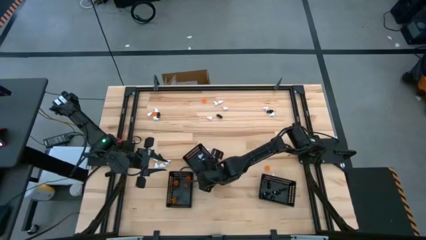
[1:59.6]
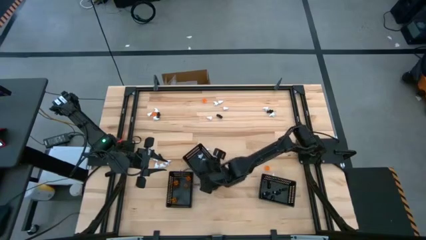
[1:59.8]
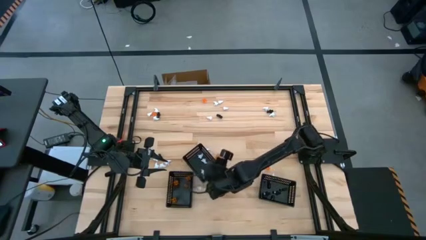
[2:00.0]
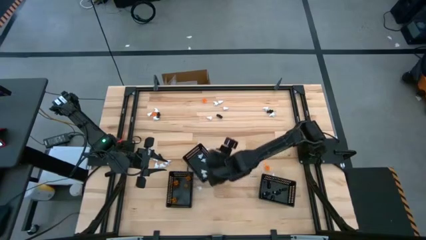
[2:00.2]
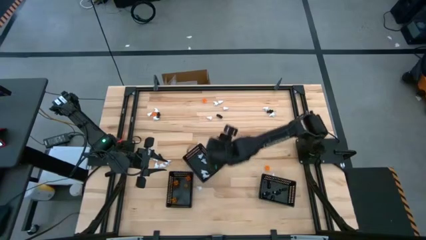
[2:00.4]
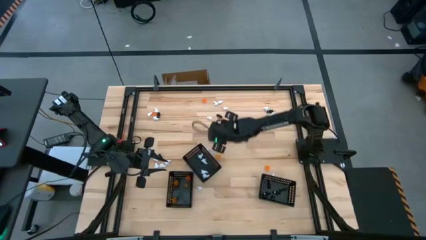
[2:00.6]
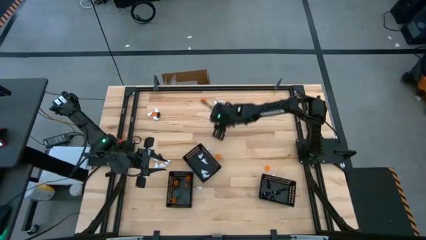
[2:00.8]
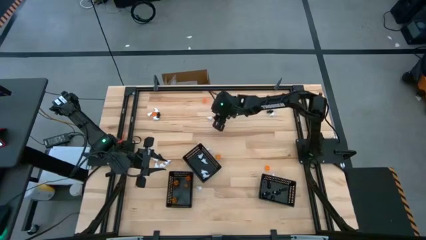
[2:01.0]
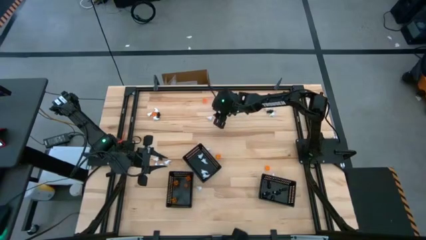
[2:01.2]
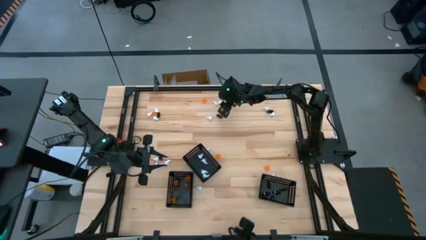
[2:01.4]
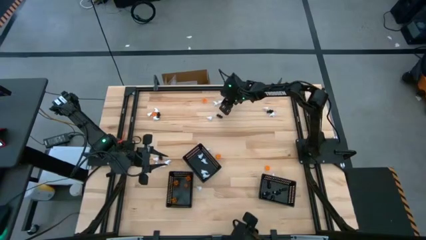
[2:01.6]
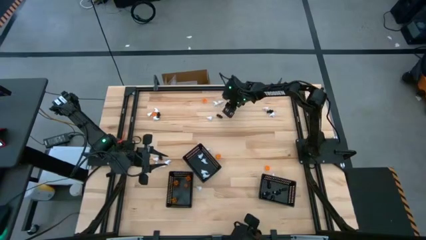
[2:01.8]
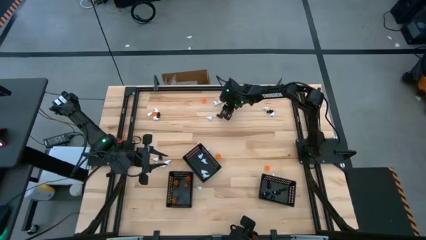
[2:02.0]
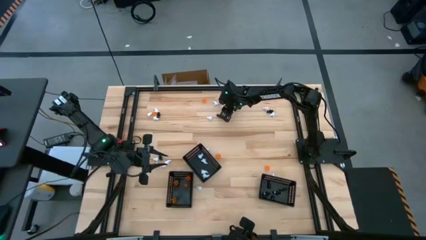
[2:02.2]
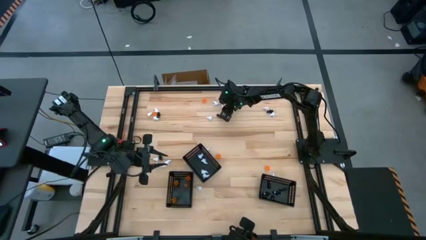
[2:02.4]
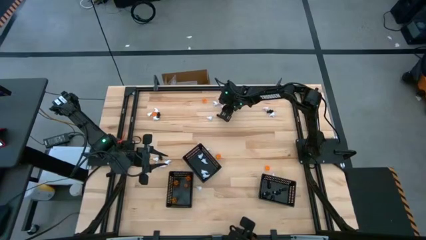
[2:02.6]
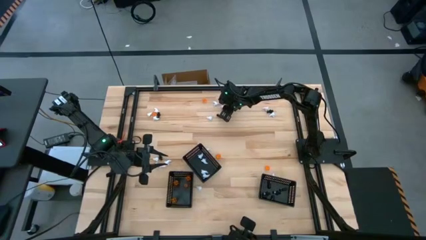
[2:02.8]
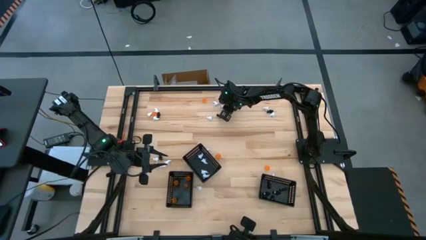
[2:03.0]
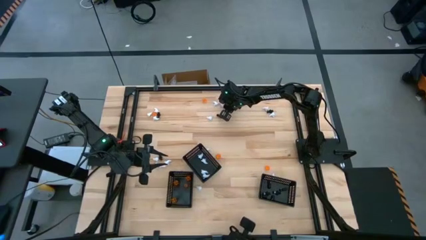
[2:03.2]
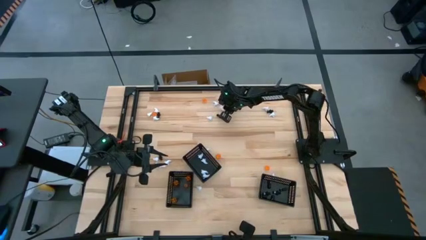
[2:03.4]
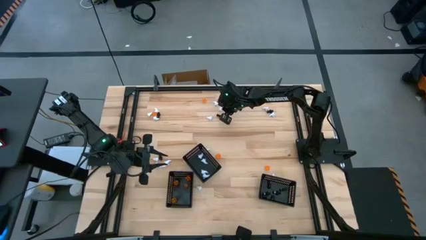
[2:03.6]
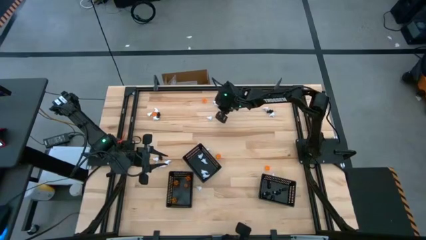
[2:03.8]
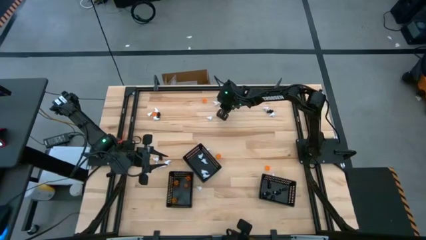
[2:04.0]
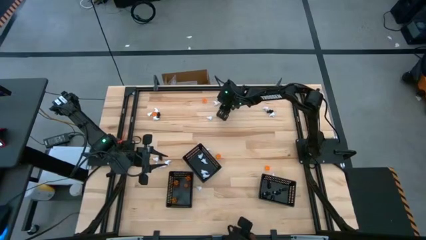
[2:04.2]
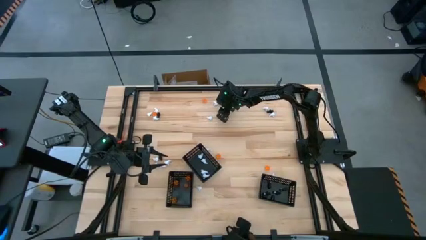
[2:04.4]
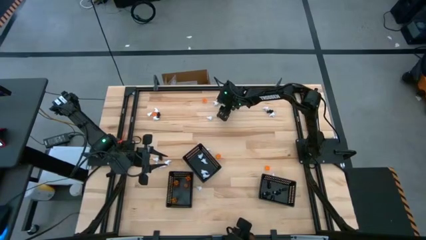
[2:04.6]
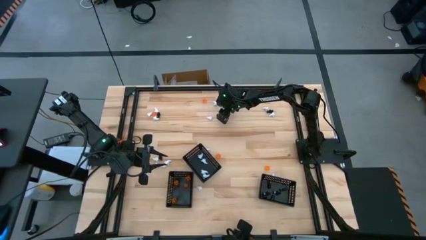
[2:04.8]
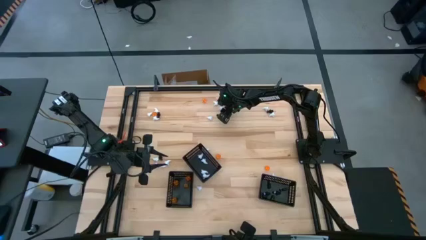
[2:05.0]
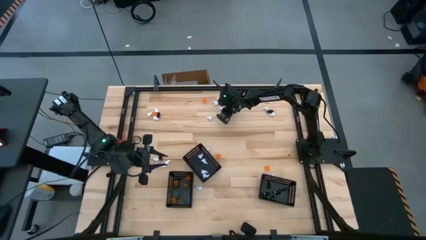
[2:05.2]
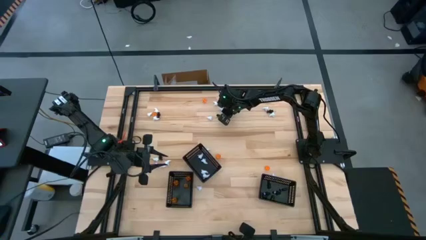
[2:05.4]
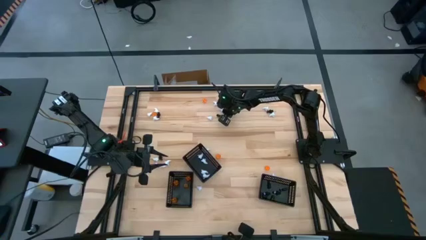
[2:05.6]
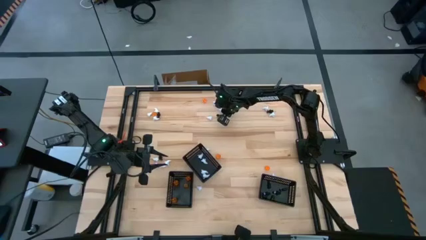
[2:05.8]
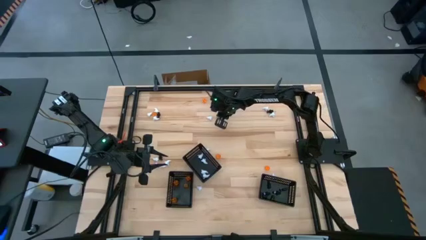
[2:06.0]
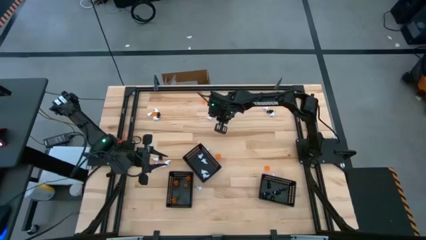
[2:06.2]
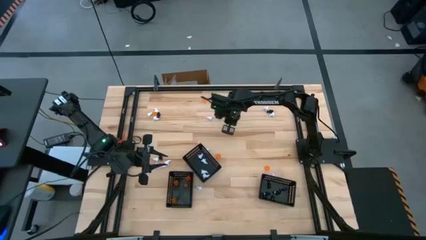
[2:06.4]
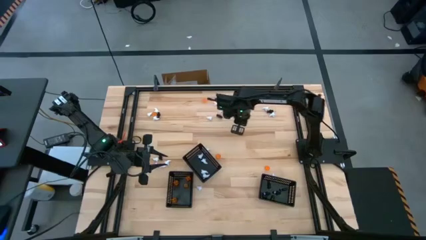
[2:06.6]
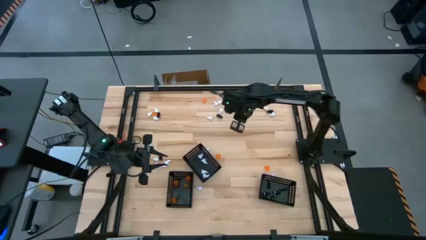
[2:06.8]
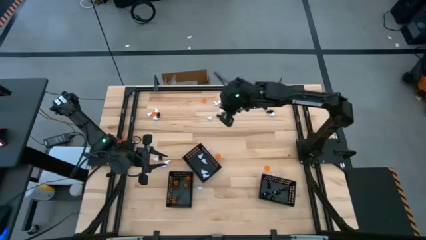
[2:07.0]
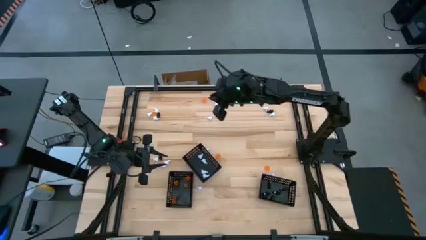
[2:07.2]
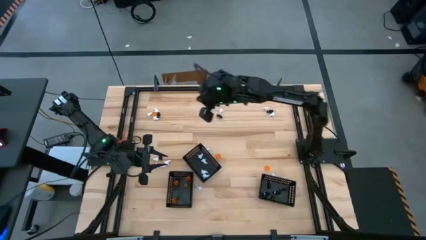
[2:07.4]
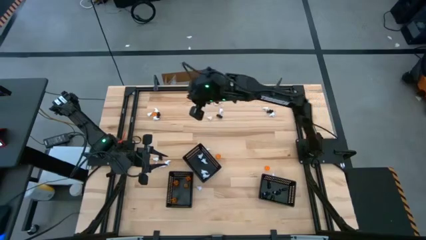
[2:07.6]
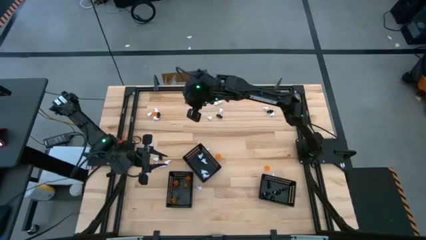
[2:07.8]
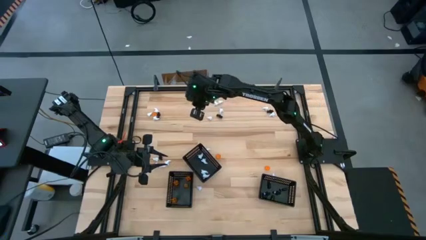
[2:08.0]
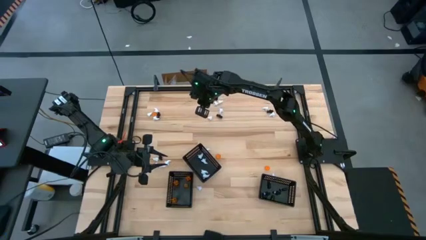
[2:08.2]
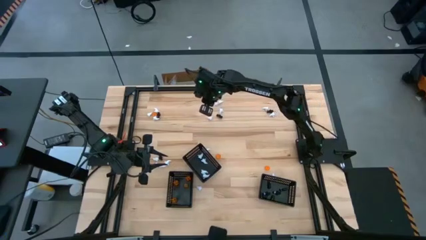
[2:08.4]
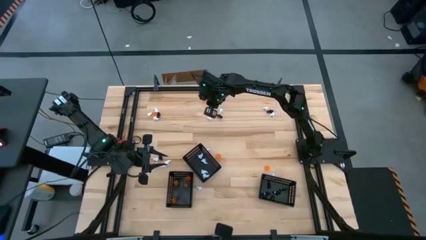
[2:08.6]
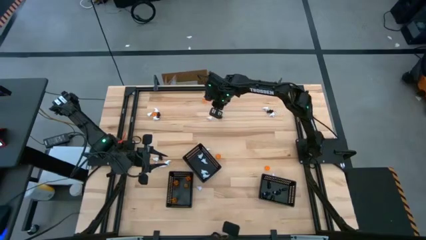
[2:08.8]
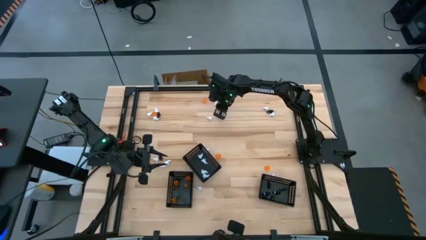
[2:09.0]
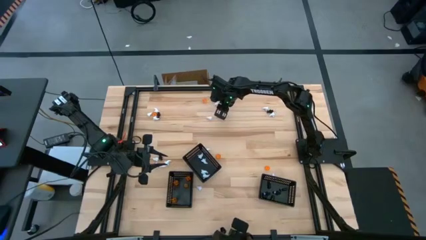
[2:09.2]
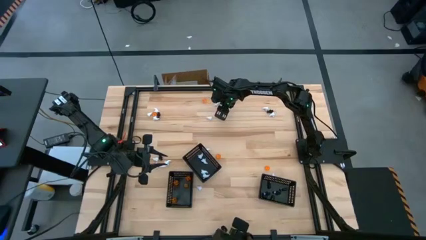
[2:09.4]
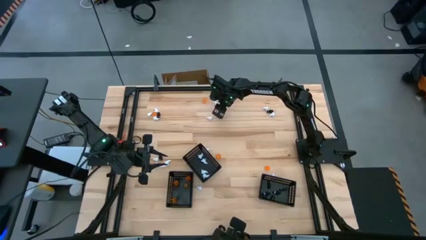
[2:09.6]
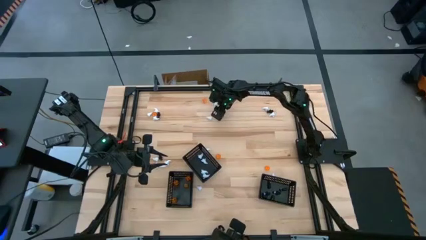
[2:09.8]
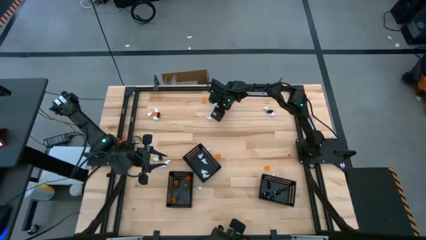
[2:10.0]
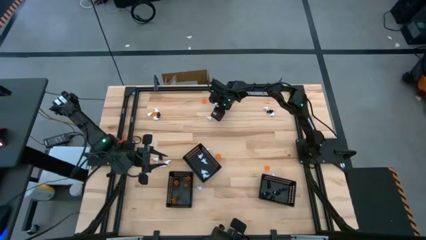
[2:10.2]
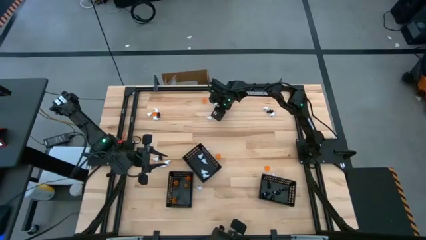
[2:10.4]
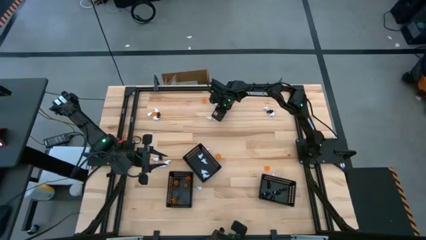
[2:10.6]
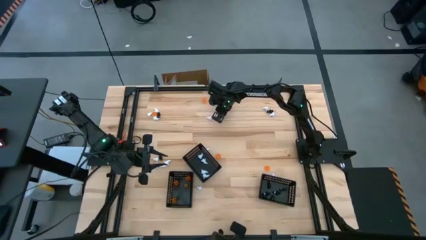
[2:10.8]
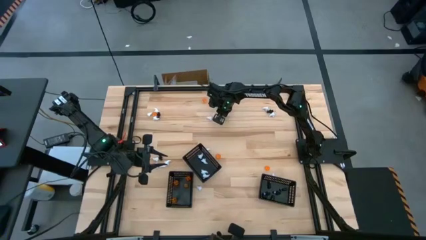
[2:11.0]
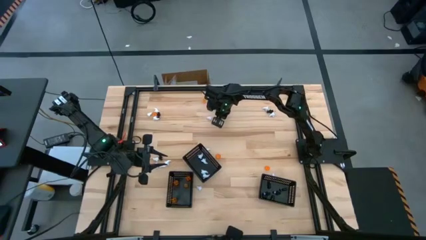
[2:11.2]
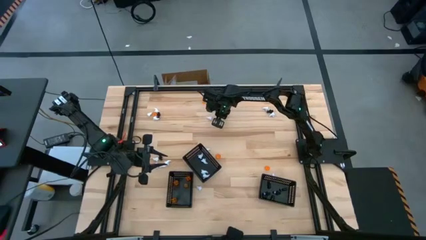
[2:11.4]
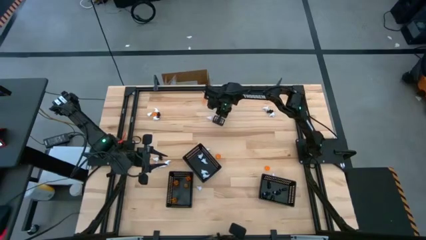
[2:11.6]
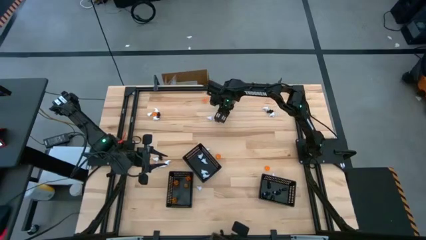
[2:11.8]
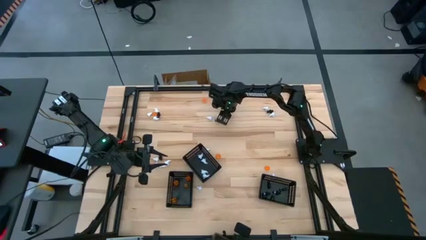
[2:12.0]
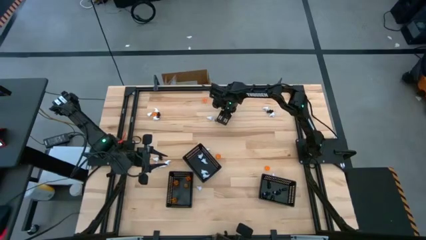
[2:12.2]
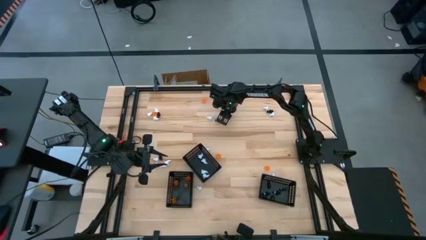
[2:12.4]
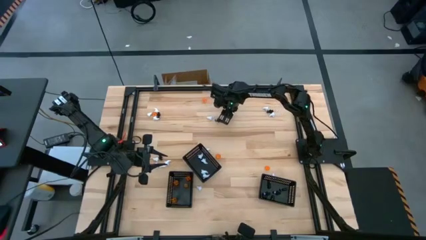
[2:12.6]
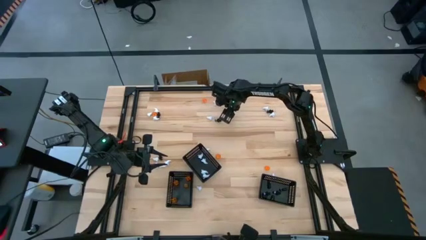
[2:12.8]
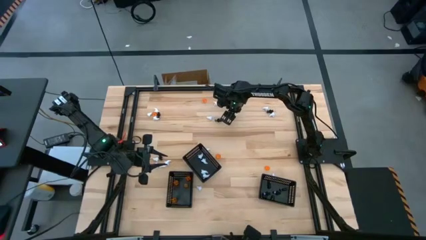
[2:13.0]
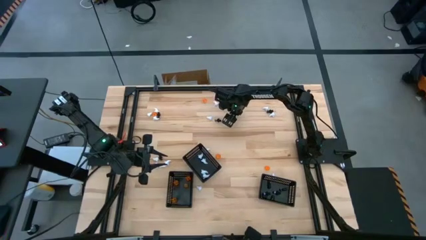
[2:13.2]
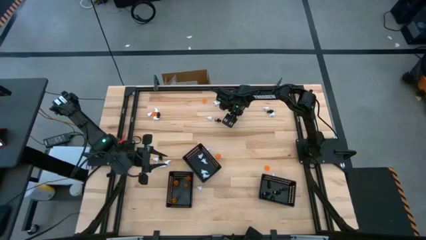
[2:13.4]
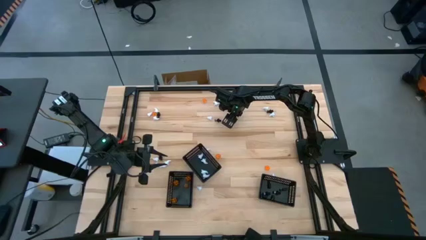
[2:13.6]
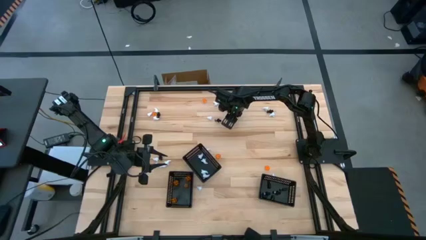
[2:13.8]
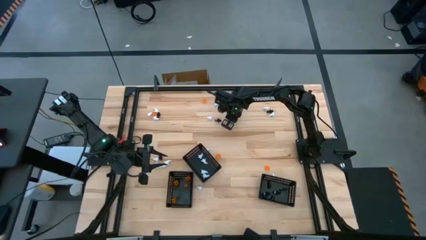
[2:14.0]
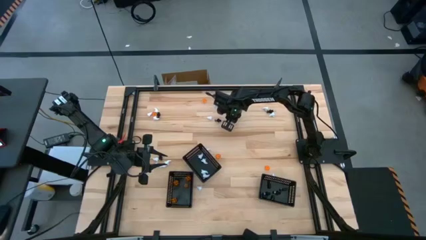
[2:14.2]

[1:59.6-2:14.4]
Task: Sort Halloween decoration
Put the white ghost toy into the middle black basket

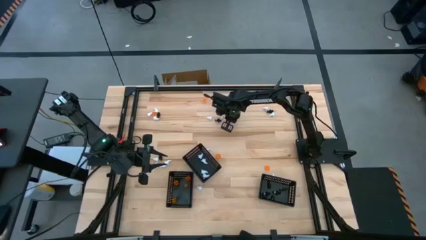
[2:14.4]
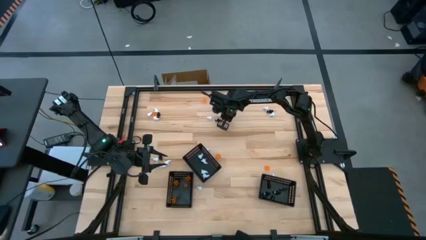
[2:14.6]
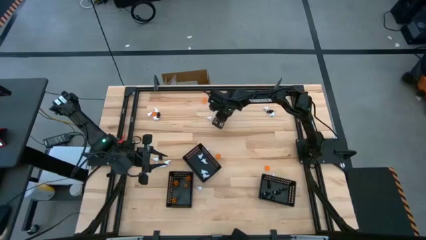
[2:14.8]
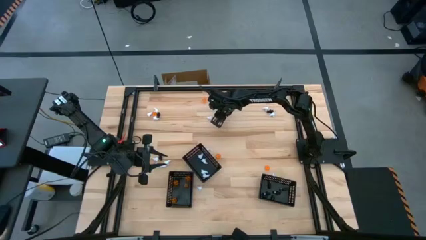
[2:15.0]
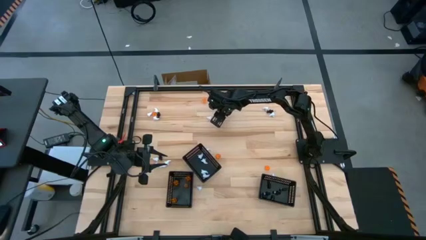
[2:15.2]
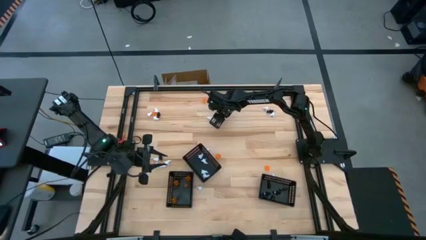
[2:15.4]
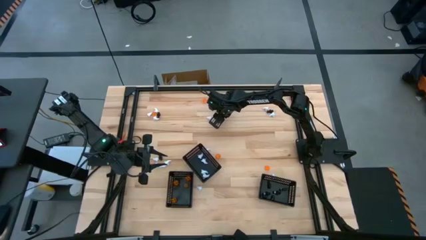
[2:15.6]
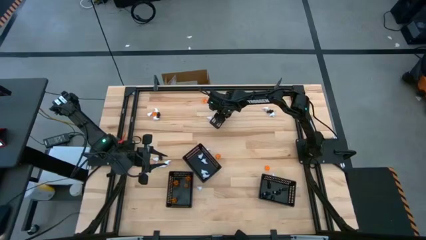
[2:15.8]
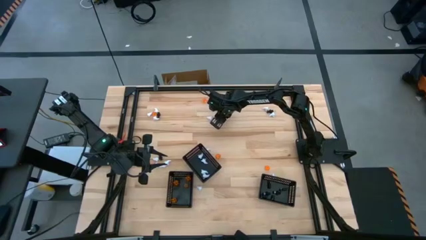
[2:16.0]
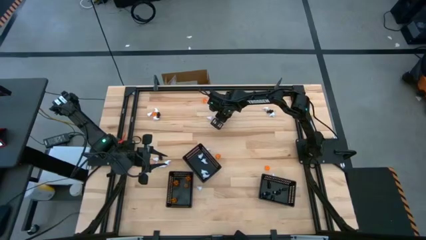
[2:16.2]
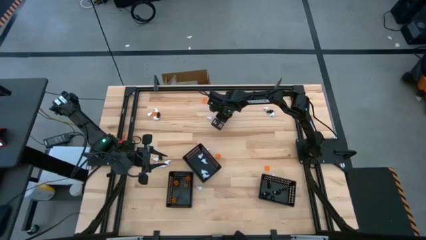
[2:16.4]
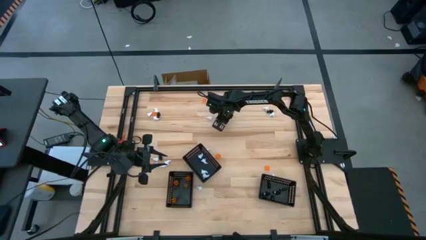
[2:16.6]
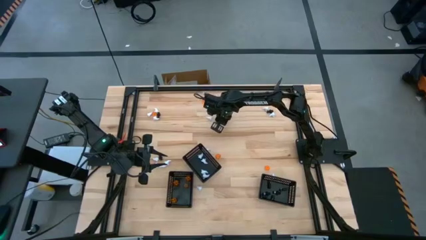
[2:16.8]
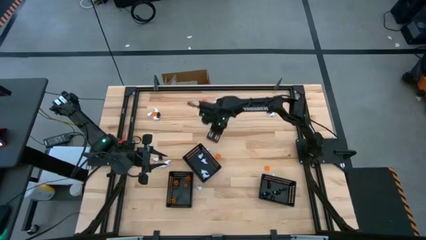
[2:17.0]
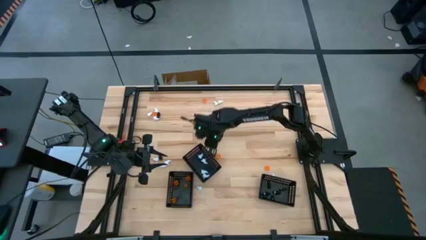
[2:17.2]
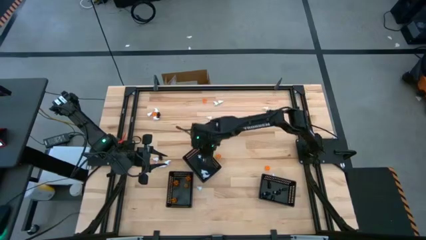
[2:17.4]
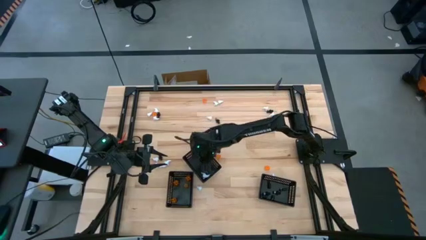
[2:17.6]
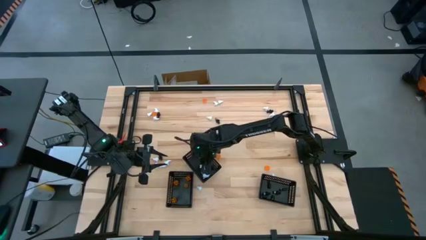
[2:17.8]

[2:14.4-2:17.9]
Put the white ghost toy into the middle black basket
